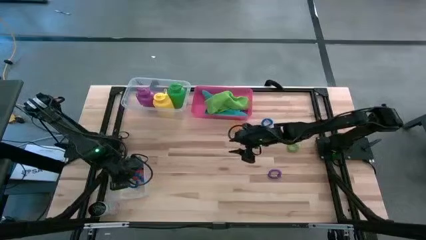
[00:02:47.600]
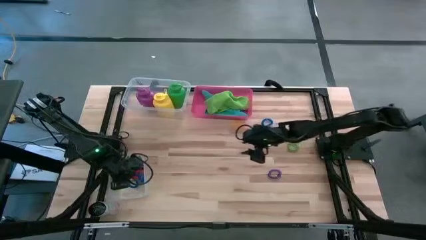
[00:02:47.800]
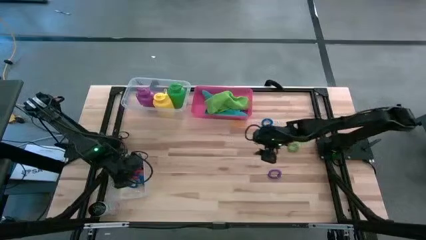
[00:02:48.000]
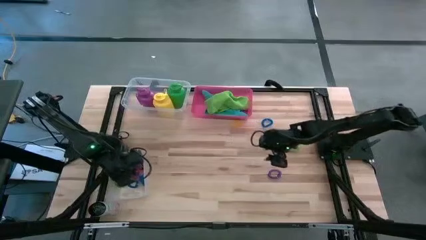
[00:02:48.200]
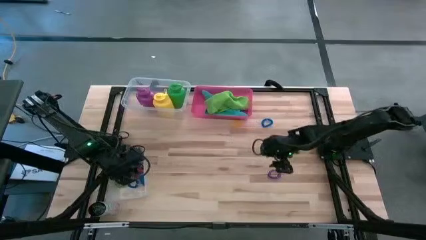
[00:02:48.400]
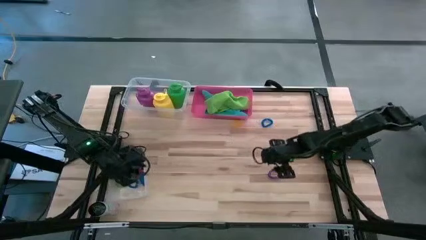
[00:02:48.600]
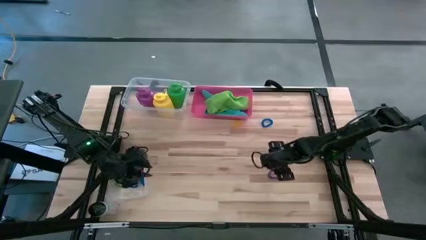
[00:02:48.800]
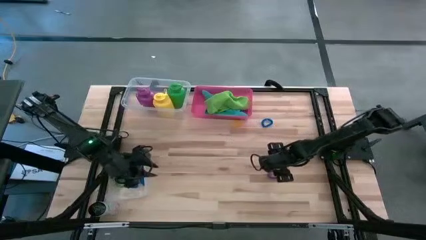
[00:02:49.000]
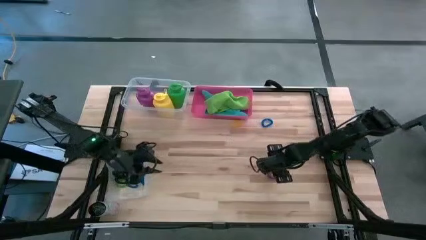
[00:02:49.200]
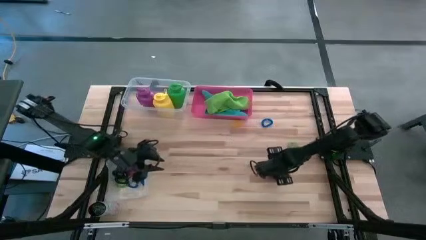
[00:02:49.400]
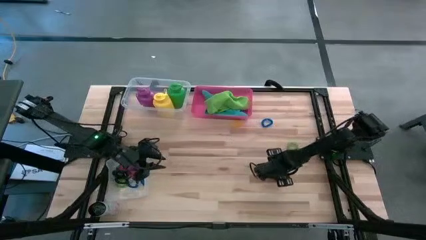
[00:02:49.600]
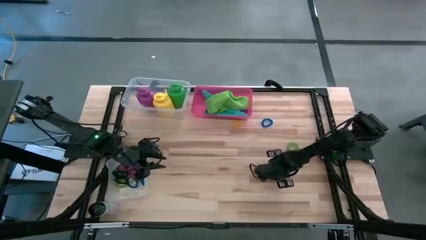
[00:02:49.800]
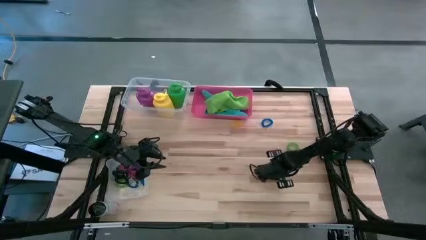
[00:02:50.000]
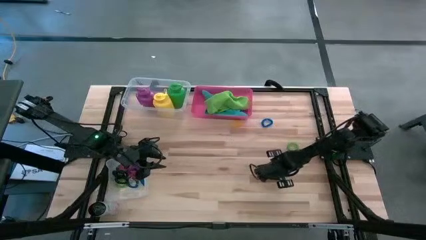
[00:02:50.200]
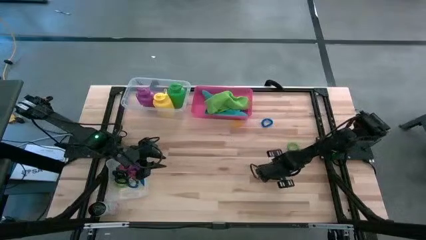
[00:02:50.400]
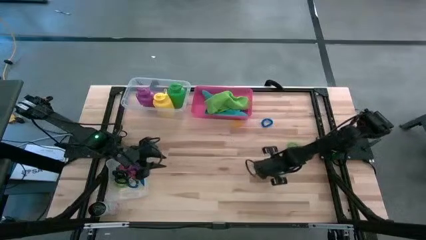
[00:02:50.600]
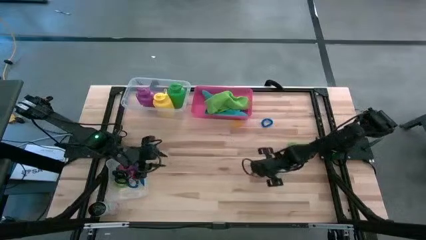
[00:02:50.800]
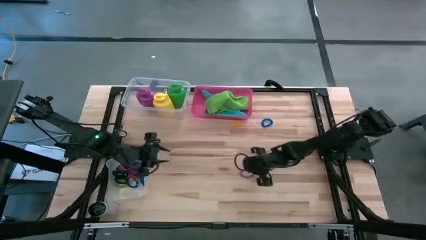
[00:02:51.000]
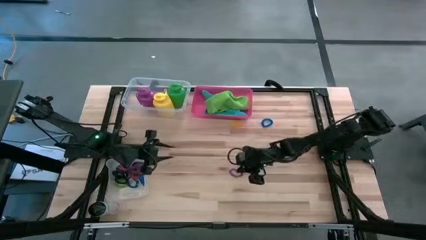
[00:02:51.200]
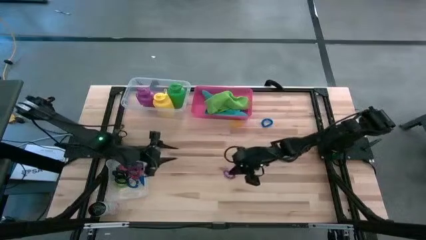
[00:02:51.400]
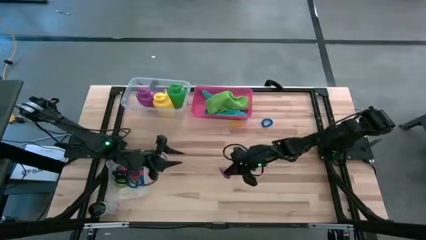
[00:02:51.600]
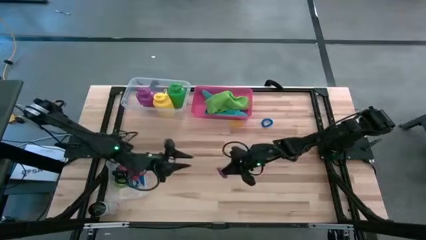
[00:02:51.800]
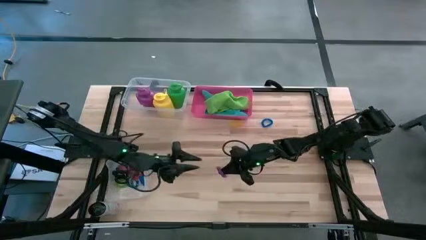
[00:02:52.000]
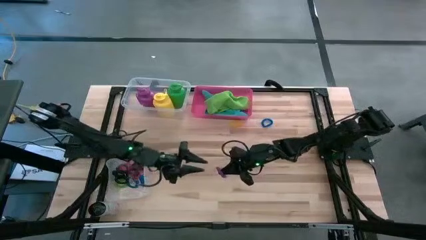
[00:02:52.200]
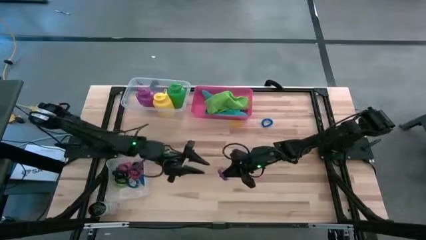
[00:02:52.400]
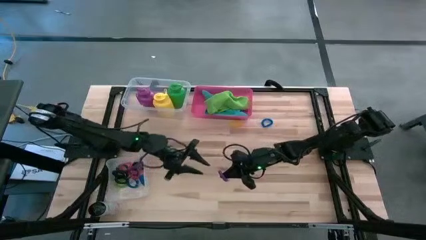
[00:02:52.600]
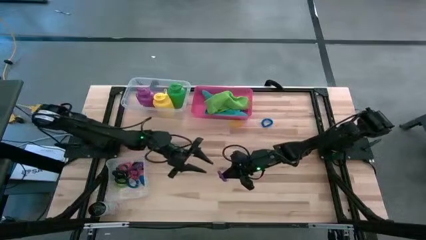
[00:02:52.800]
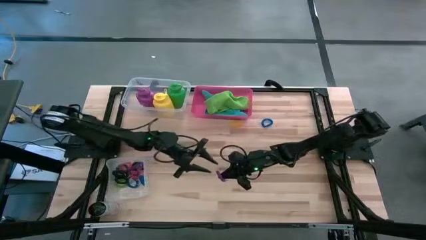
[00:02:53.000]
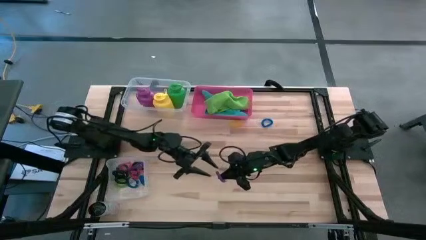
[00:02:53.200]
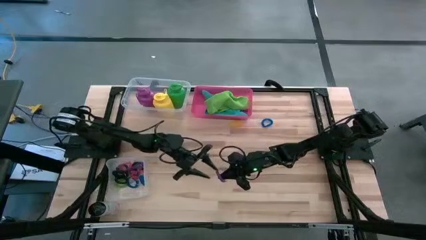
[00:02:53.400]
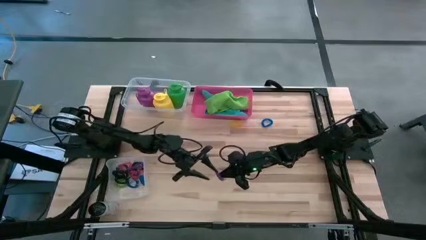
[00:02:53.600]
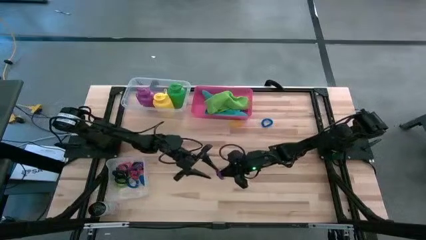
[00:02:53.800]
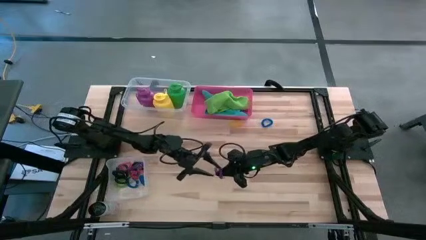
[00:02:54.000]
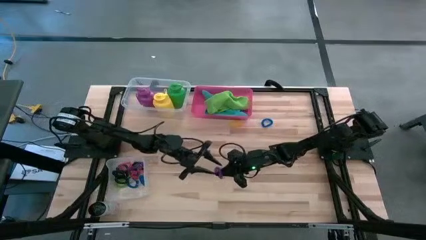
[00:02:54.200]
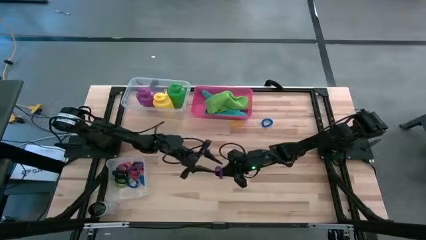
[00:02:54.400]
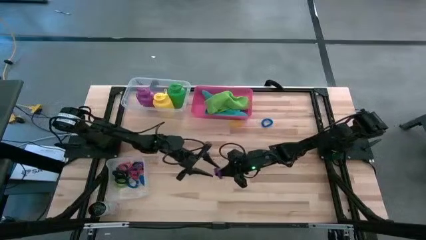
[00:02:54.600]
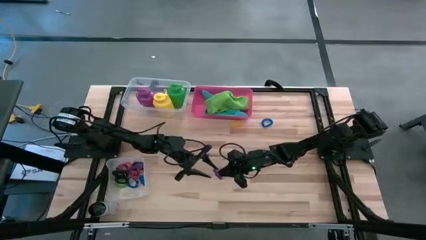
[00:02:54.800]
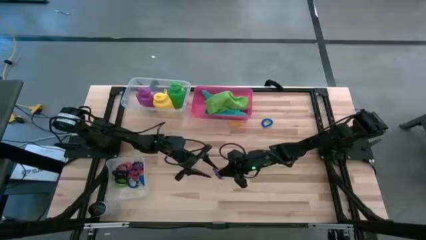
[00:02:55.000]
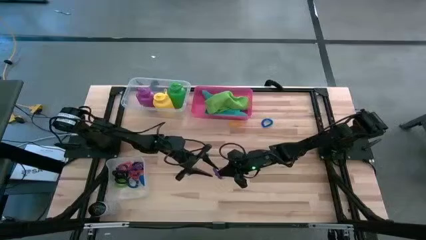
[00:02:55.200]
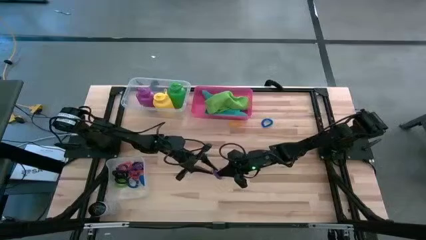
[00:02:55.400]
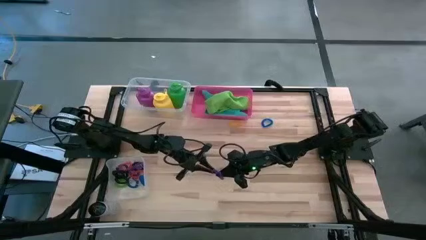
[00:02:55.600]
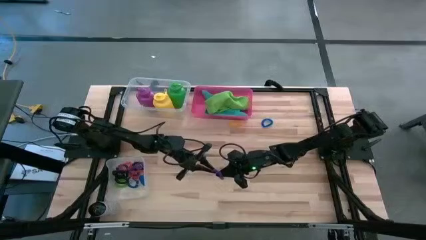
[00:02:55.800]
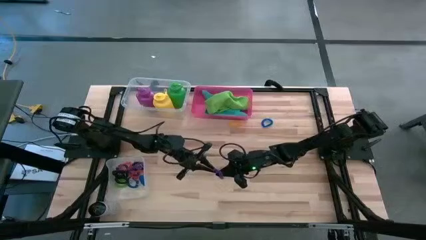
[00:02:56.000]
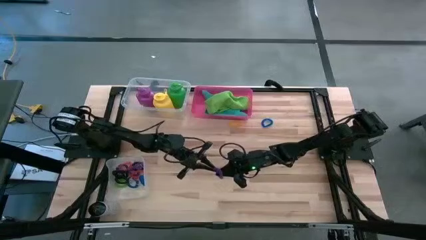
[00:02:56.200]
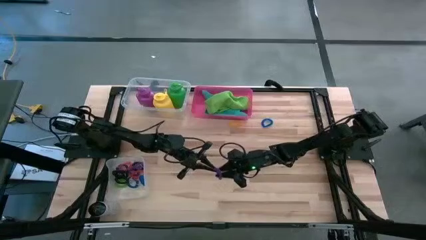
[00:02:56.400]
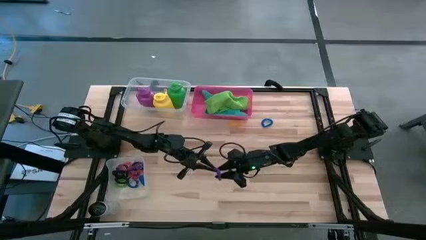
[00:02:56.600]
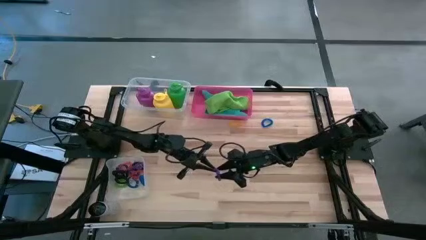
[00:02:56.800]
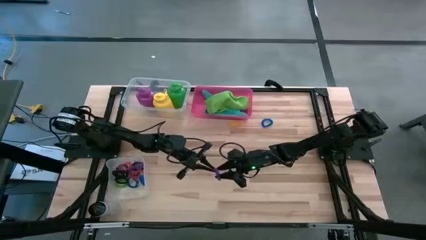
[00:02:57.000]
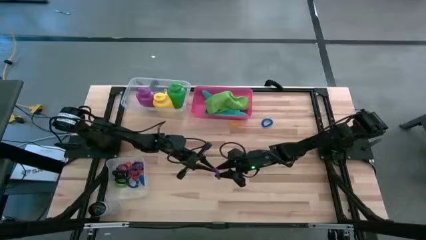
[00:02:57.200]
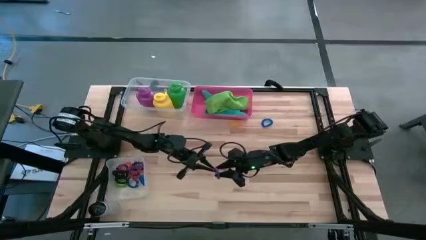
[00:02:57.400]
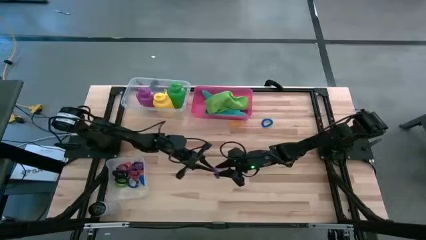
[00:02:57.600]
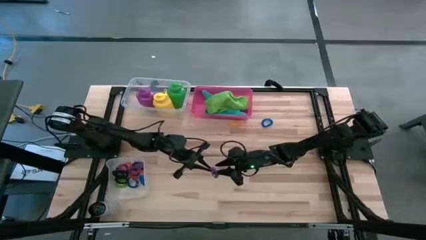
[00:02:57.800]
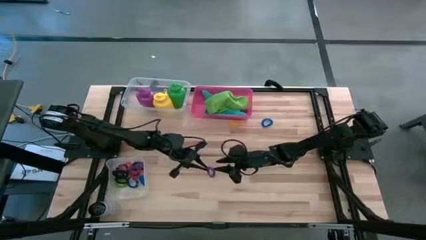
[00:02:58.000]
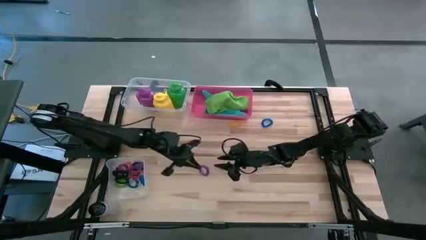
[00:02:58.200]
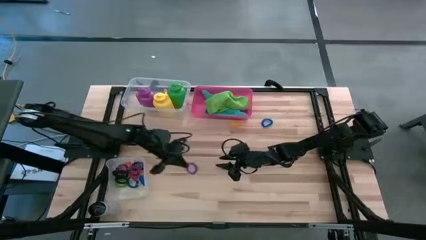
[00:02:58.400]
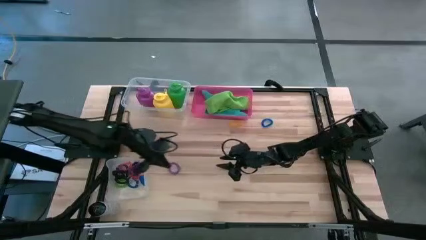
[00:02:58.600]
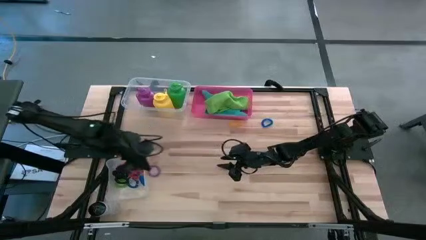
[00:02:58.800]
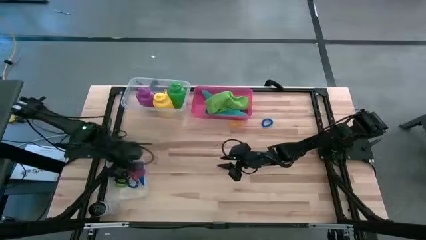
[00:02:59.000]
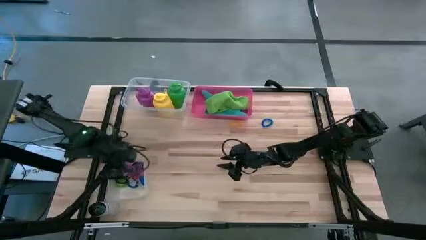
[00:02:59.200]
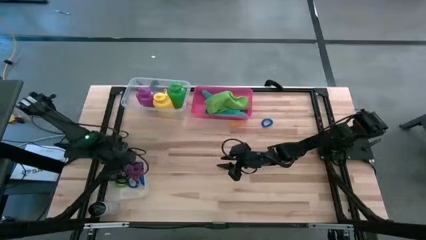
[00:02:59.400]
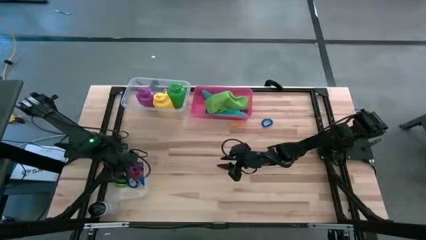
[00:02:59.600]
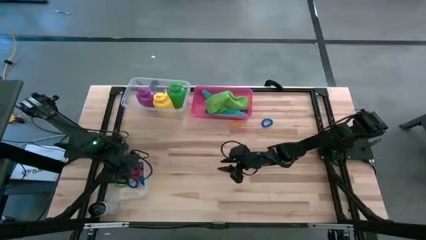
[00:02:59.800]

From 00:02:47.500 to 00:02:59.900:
Task: Pick & Place Sports Items
Put the purple spring keychain into the bottom transparent bin

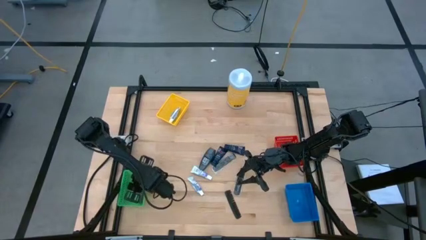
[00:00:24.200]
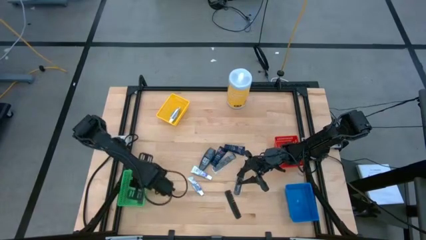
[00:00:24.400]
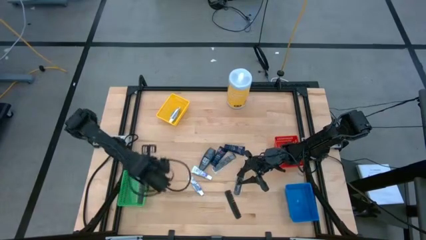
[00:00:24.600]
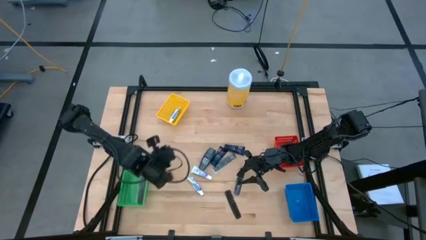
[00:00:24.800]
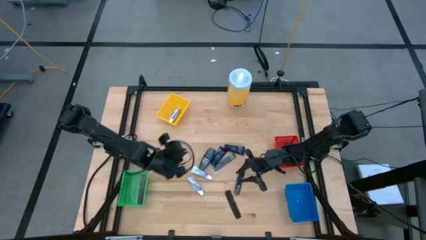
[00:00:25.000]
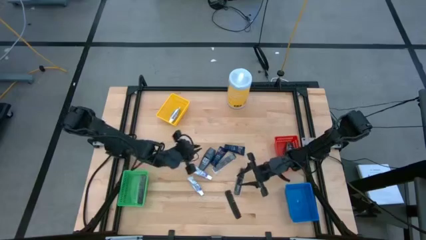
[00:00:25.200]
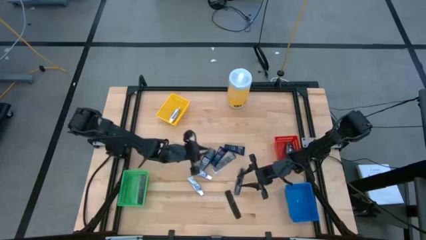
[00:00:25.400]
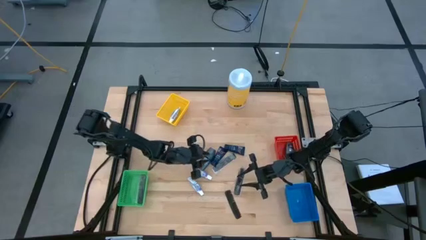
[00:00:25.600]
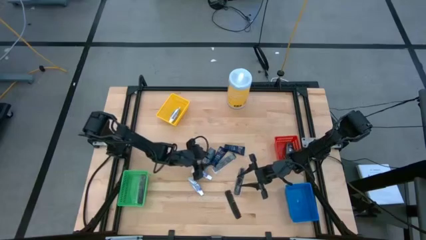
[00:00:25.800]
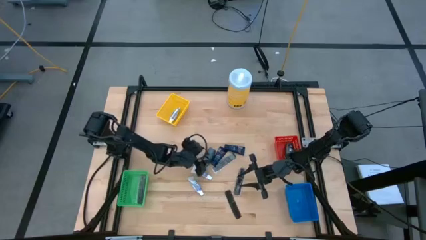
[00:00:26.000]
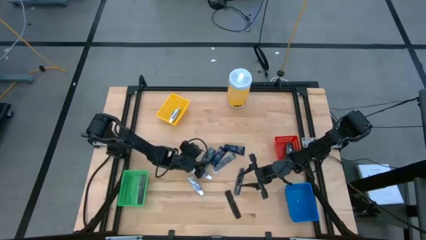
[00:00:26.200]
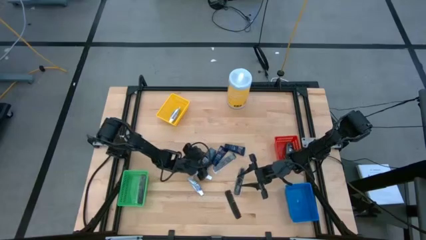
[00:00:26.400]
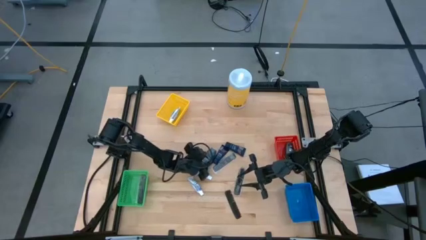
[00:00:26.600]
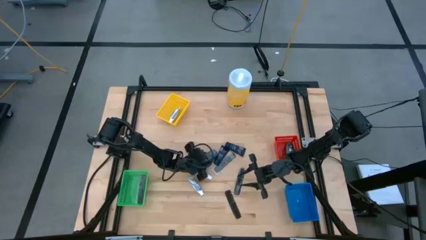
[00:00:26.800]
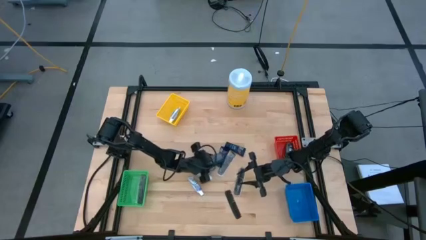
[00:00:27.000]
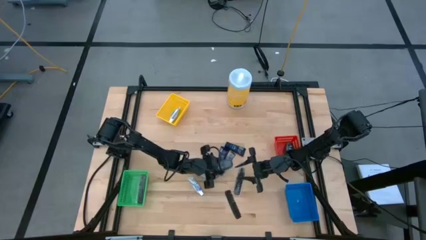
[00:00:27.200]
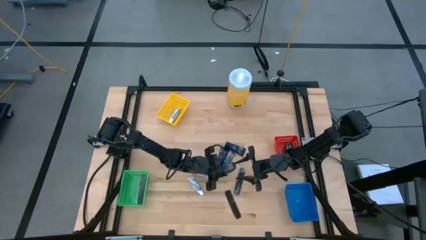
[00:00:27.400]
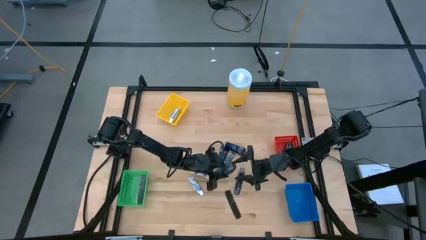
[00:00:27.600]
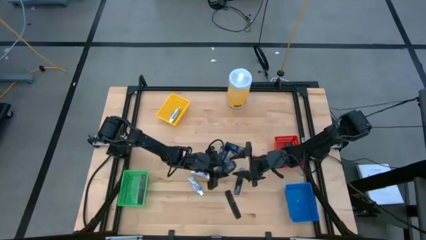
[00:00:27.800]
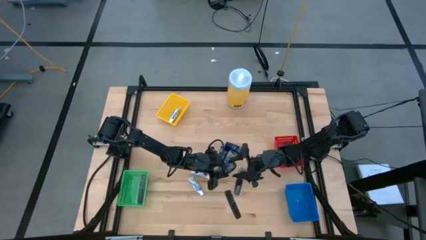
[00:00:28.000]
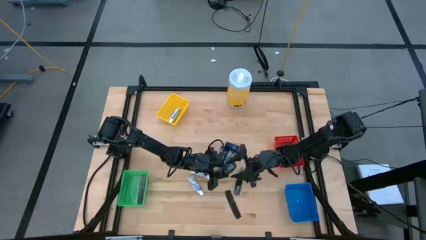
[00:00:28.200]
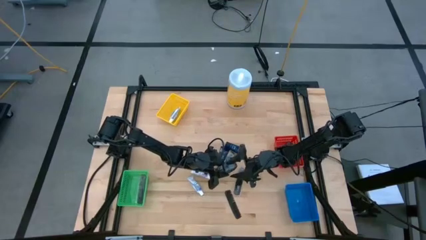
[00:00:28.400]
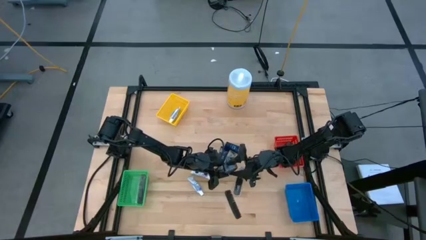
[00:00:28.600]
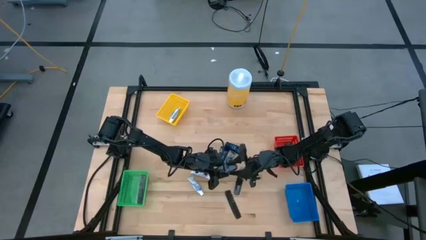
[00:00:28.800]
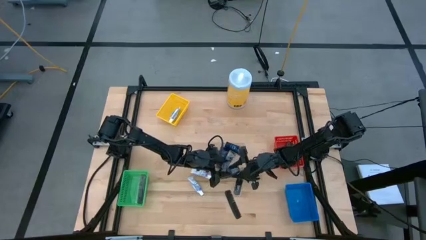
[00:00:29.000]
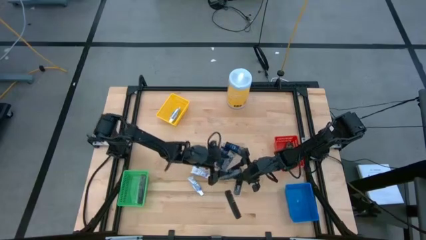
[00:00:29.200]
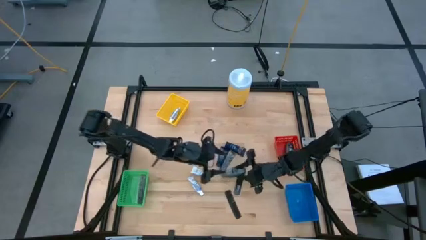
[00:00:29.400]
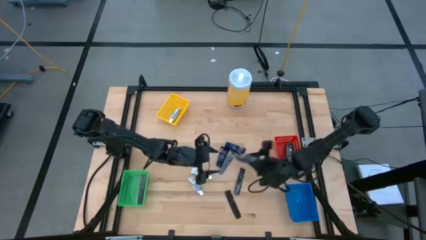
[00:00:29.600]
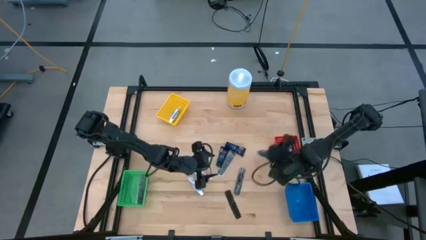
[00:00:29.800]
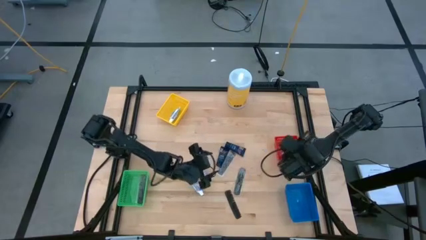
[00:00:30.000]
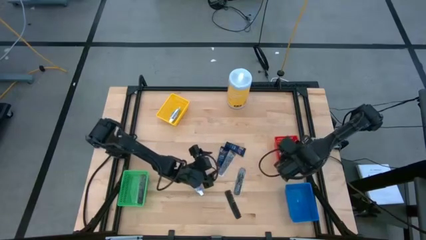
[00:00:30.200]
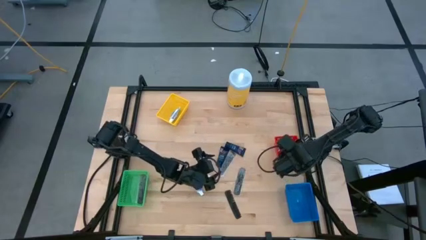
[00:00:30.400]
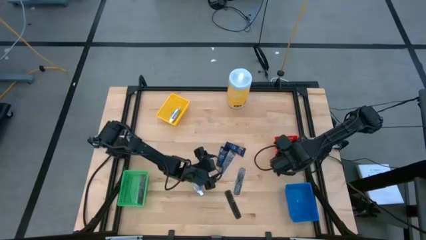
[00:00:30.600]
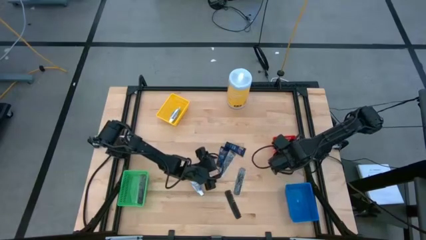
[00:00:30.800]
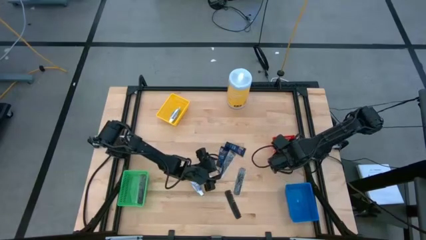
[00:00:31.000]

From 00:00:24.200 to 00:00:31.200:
Task: Pick & Place Travel size toiletries
Put the black deodorant into the red bin
